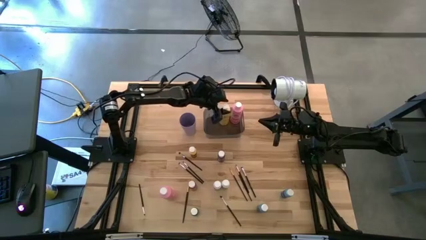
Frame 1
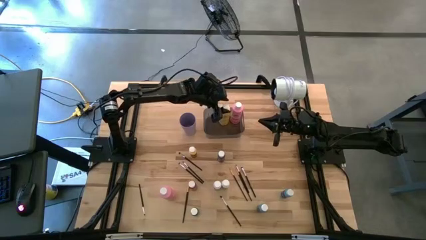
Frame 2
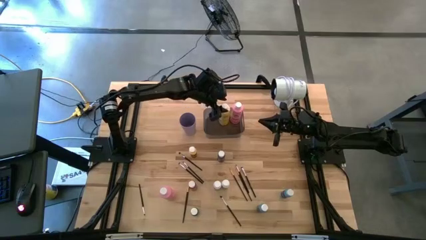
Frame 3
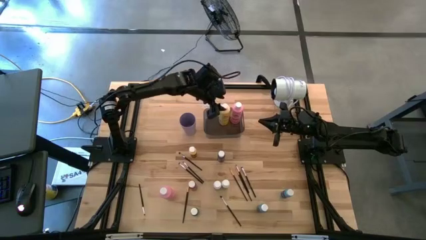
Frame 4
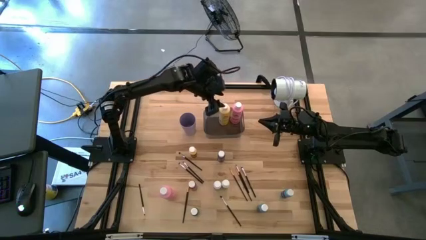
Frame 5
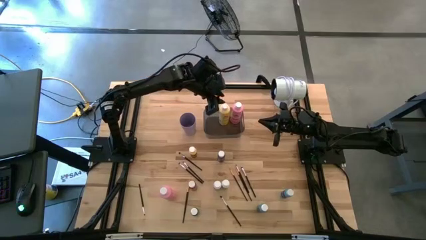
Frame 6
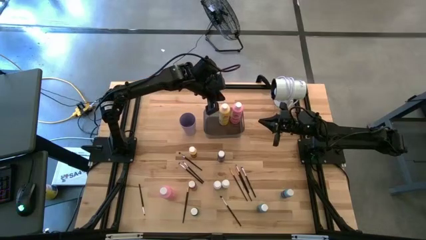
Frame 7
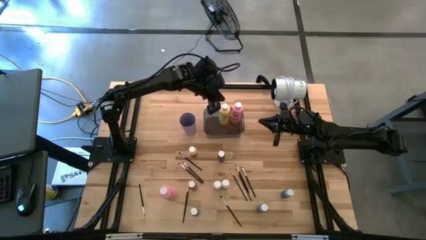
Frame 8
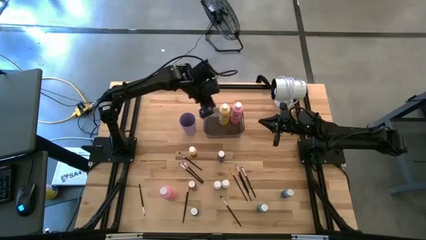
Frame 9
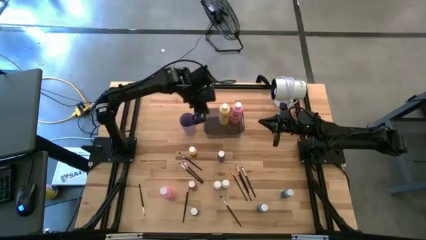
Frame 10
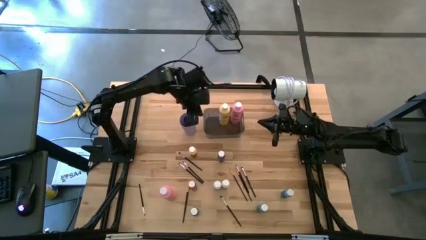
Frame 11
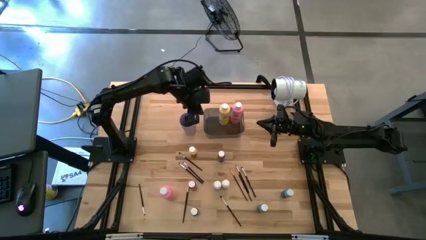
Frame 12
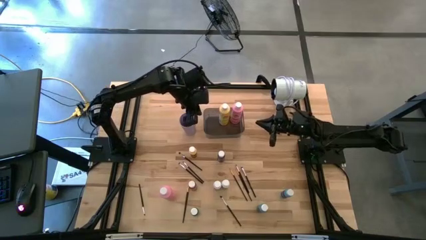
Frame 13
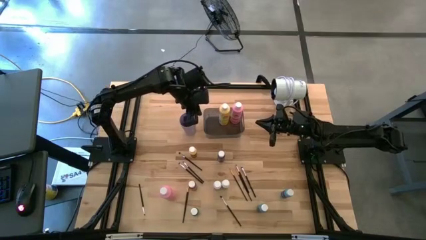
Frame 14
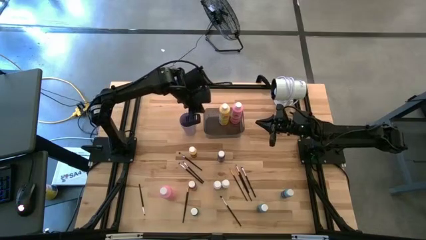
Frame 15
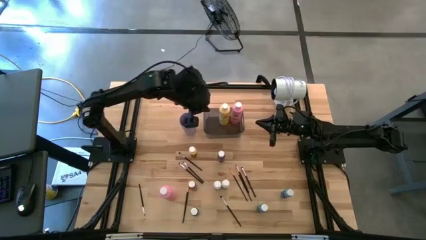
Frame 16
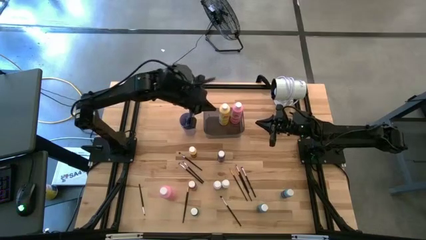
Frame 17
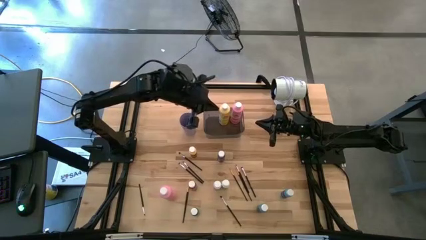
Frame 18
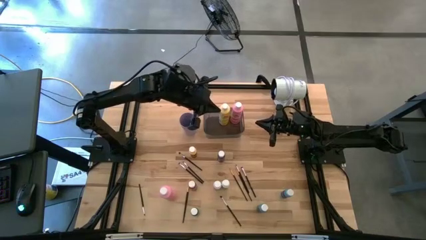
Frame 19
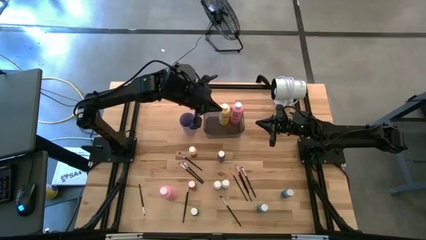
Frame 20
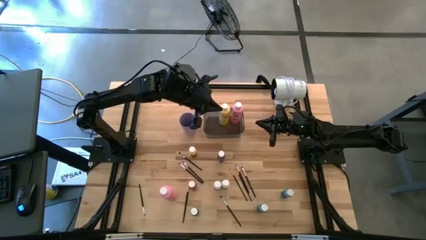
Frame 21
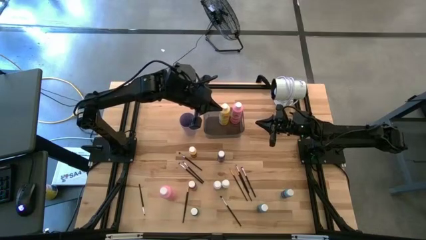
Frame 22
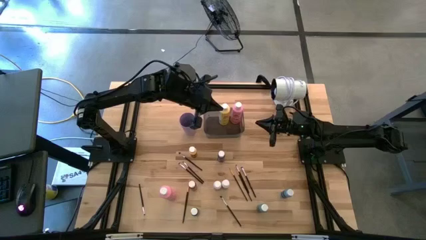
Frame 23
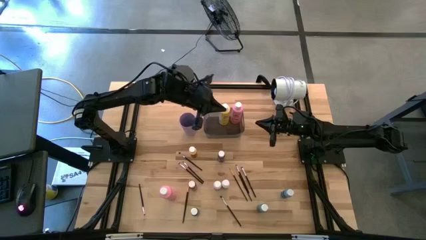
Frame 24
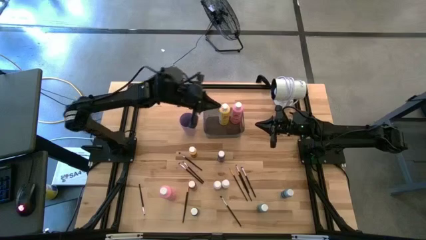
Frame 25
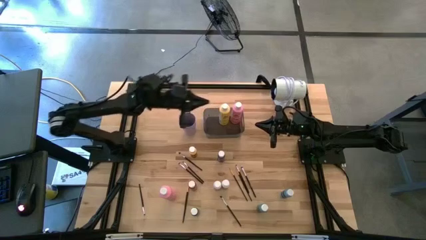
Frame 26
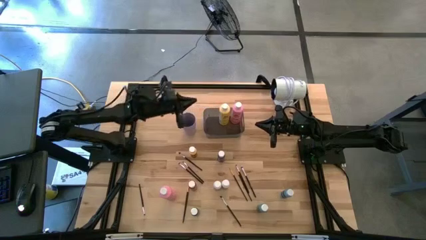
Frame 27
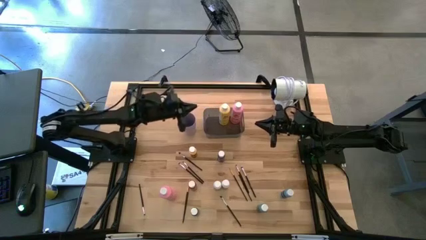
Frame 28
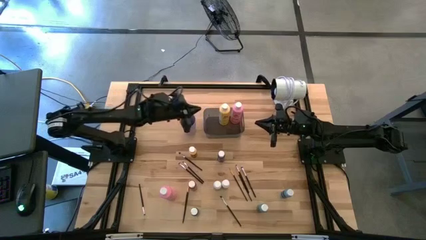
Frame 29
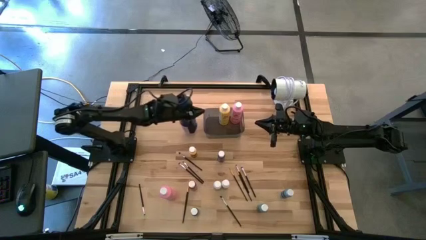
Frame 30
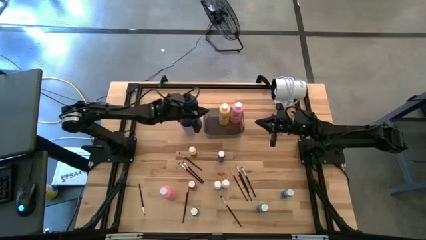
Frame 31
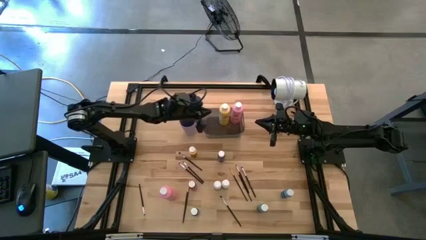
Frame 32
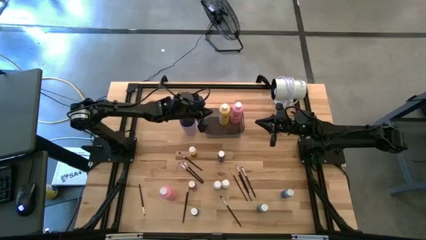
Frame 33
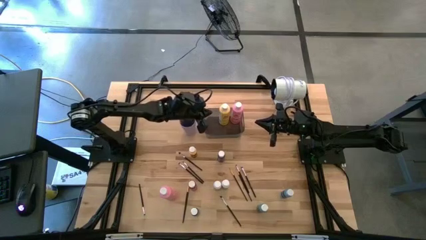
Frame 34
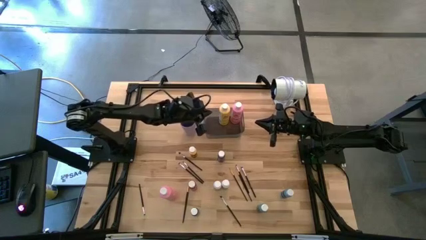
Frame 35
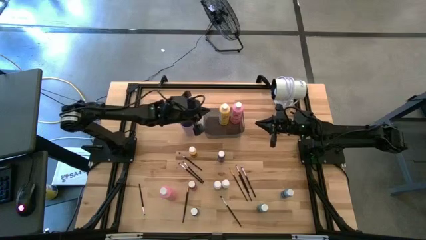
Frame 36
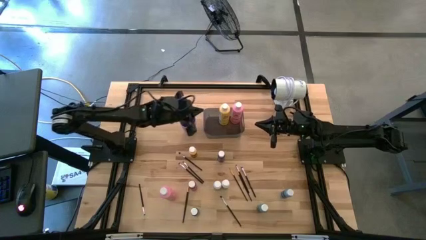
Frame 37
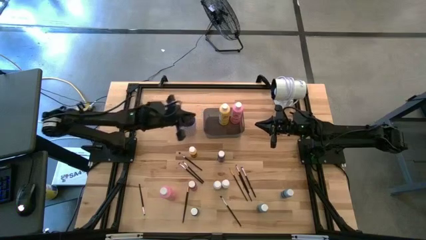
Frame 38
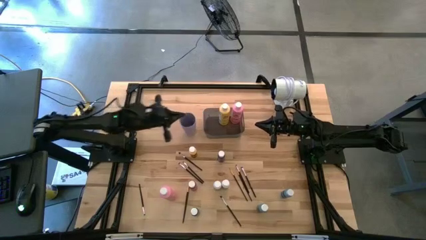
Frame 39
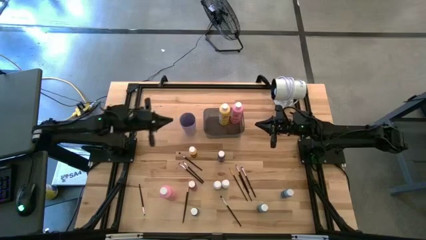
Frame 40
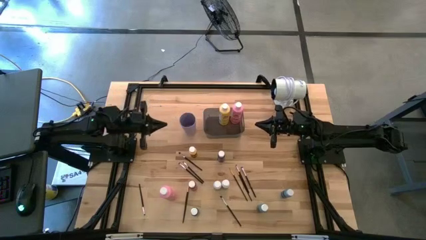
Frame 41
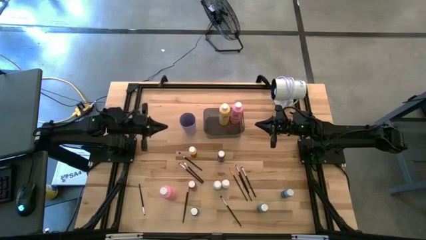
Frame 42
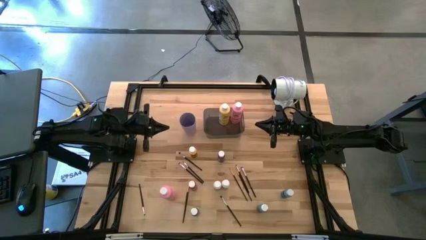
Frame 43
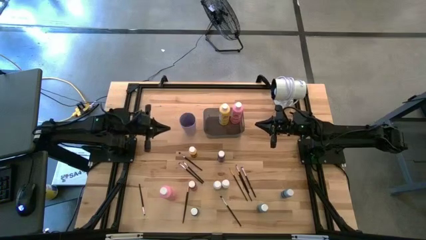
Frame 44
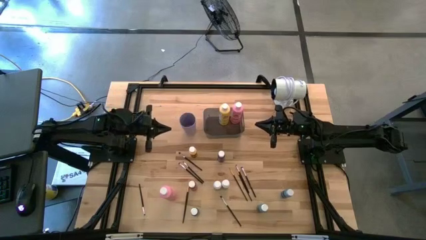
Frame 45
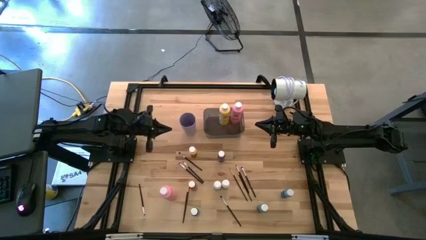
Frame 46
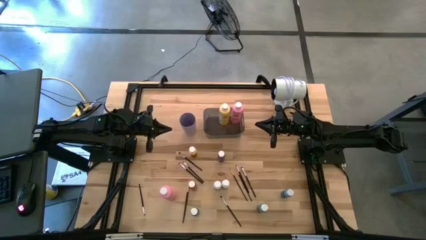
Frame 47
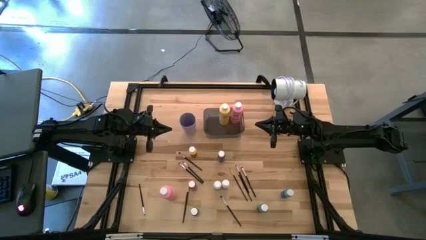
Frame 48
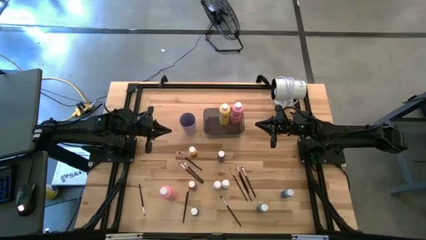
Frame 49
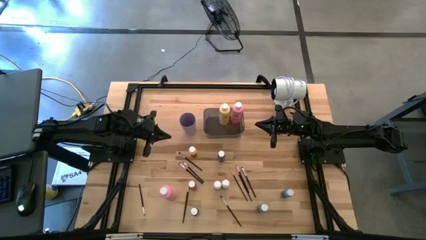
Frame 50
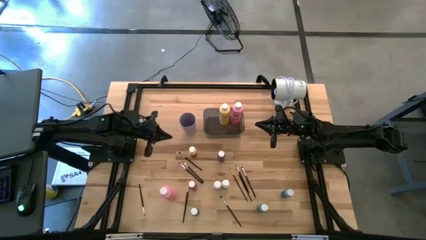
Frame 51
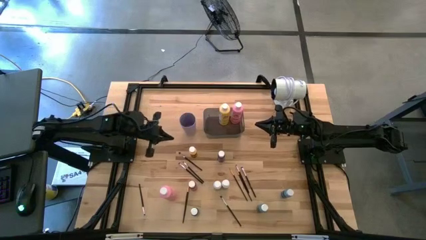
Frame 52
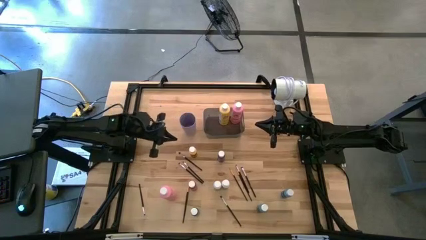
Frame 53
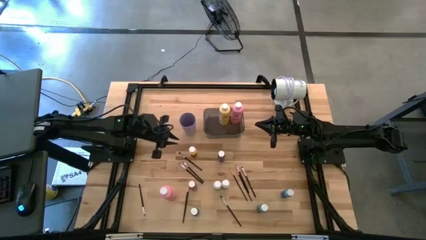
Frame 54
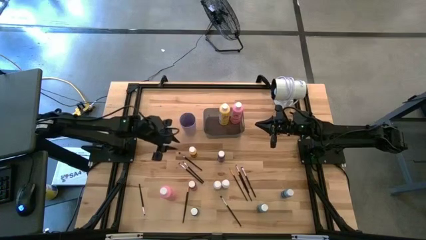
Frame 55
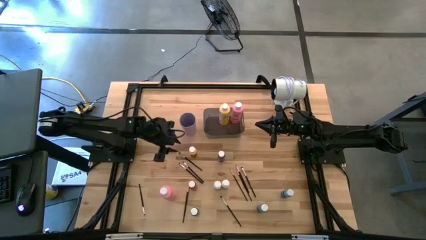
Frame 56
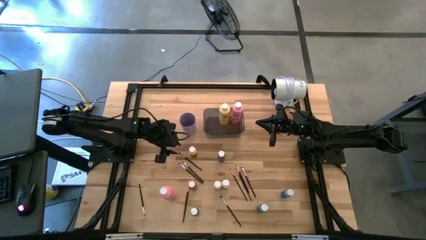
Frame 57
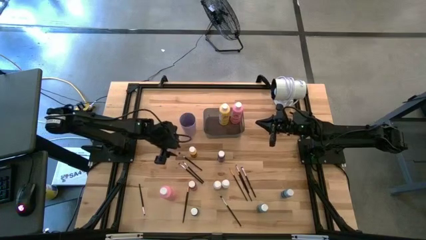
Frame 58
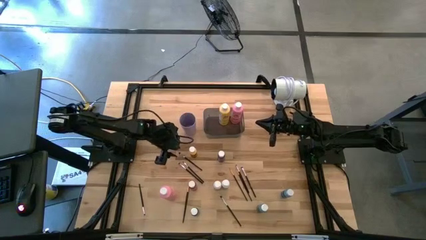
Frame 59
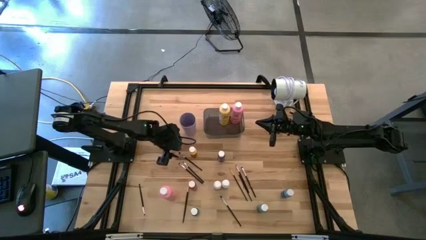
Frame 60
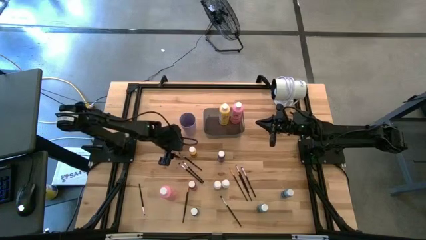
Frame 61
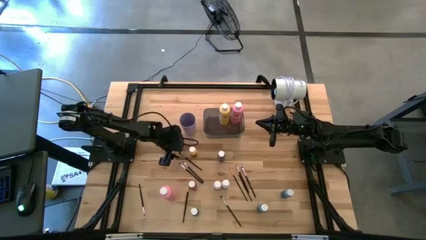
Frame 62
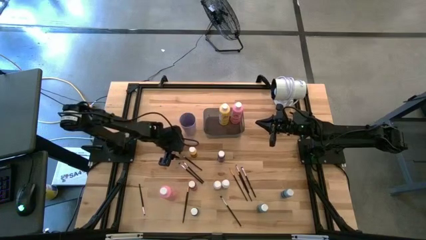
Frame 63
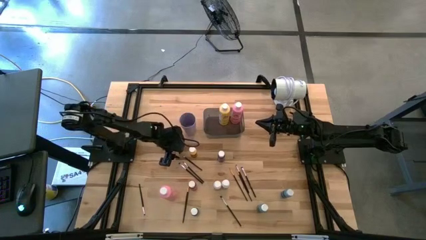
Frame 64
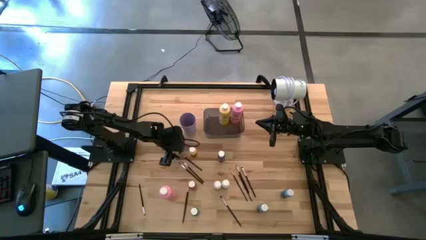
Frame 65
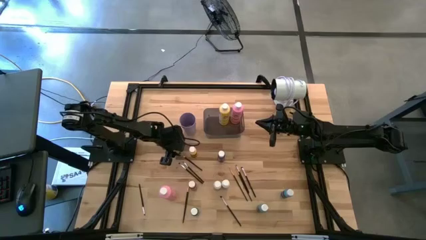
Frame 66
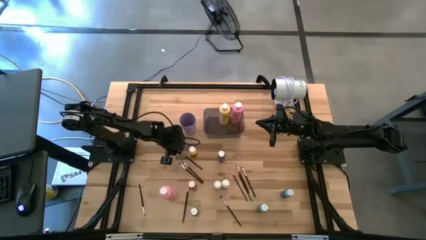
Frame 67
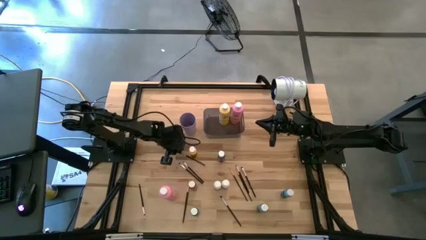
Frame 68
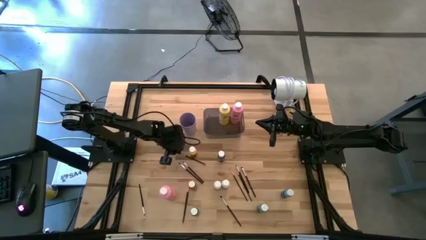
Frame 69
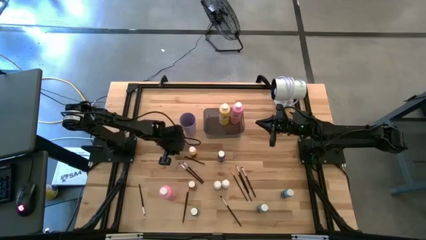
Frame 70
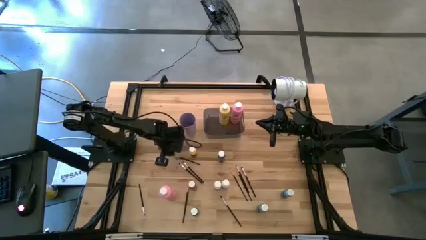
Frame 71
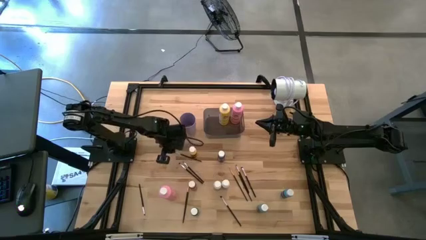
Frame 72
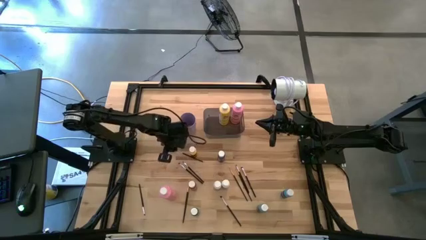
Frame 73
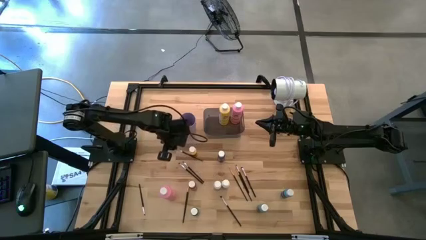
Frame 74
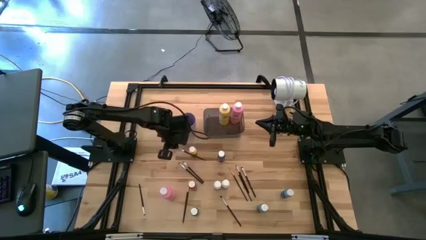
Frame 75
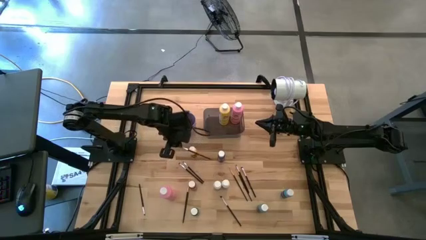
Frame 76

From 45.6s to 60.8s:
Task: Pick & Place Paint Supplies
Put the silver paint brush into the purple cup

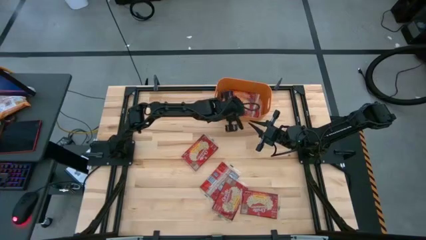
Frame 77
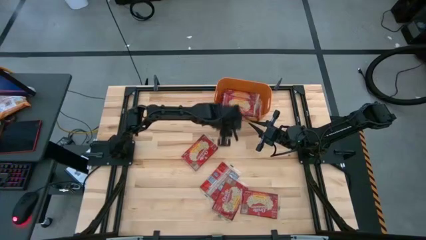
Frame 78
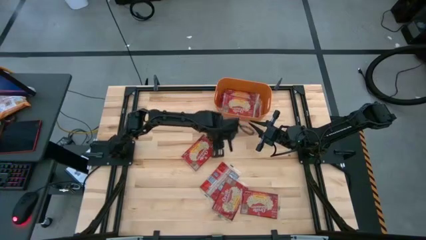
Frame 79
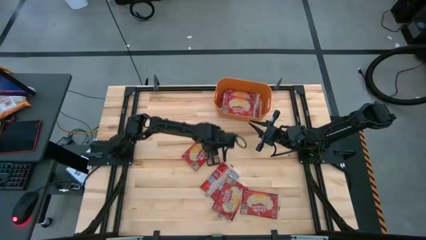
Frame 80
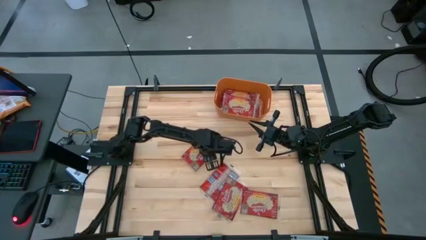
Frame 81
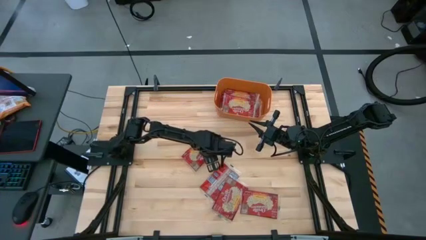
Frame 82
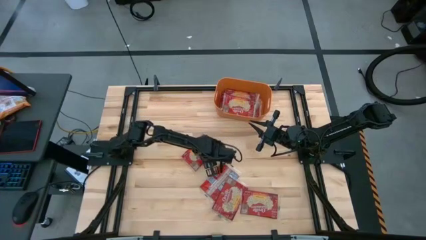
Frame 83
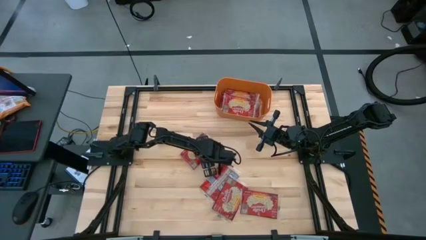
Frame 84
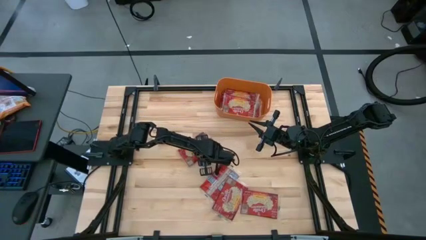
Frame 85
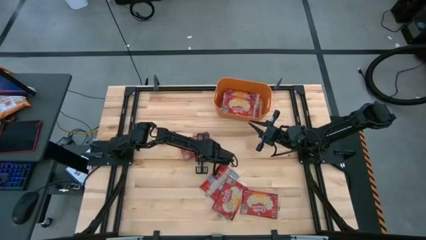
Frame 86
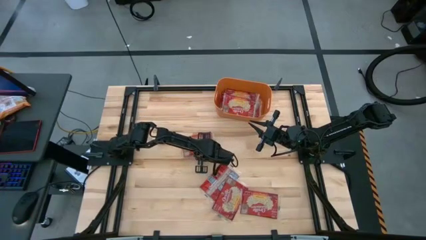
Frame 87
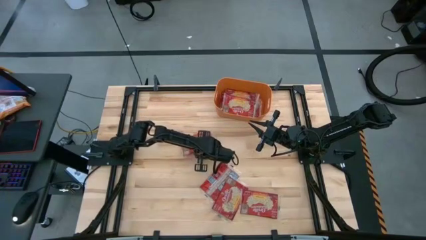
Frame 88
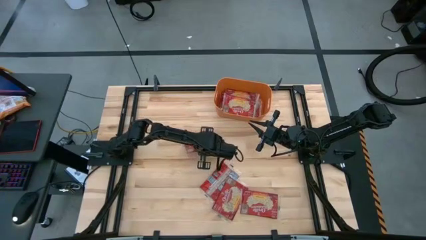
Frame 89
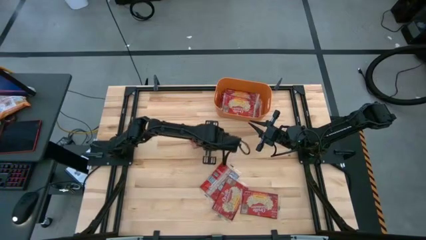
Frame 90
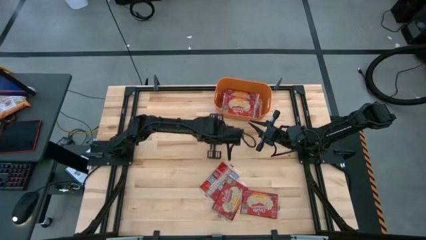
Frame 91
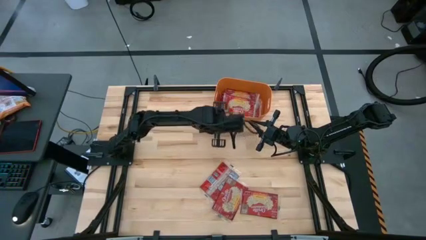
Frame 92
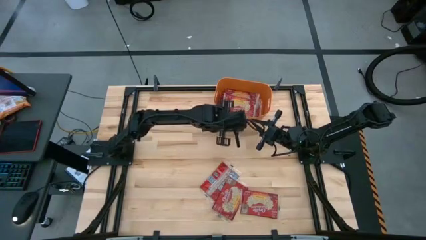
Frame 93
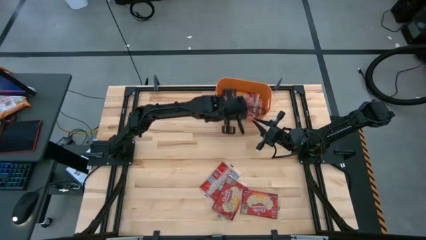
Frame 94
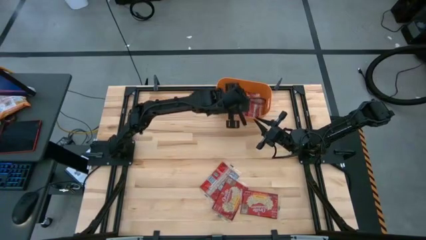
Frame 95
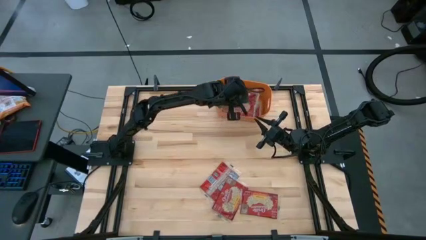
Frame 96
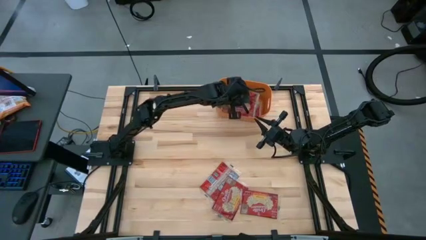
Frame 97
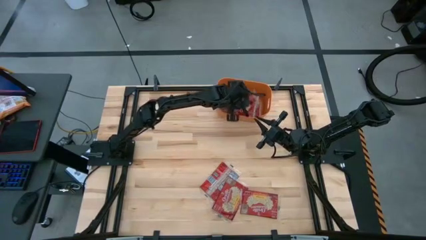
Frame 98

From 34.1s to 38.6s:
Task: Sort popcorn bags into baskets
Put the popcorn bag into the bin
